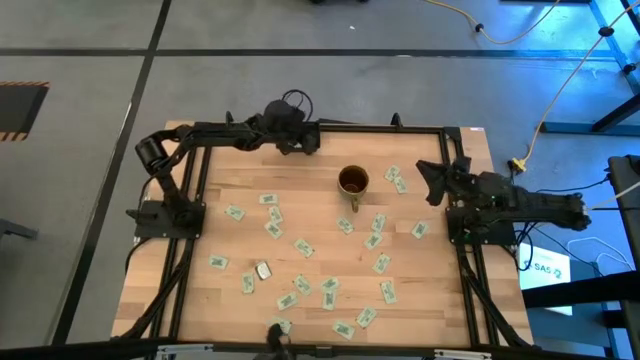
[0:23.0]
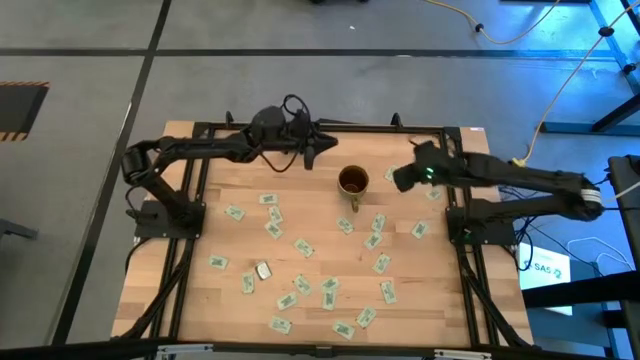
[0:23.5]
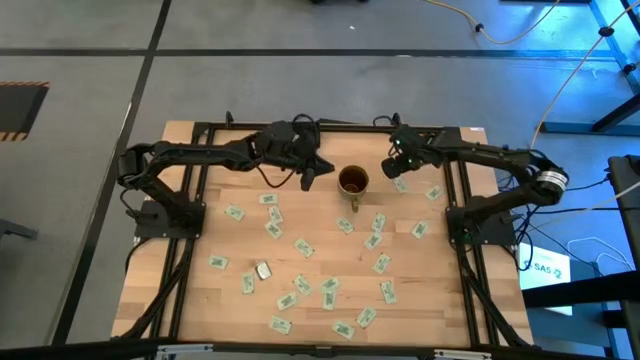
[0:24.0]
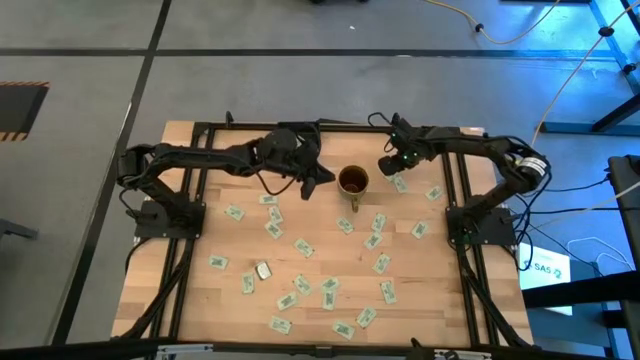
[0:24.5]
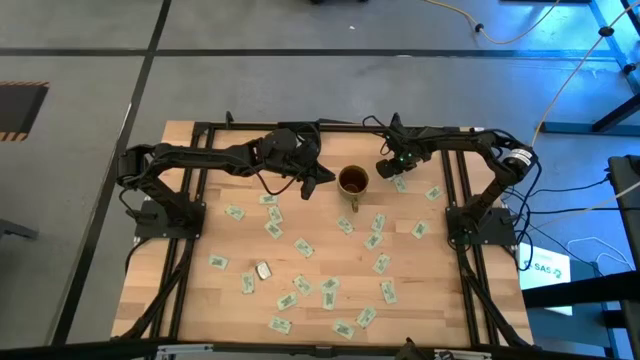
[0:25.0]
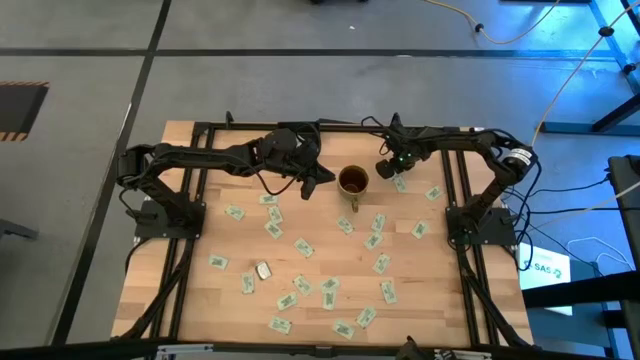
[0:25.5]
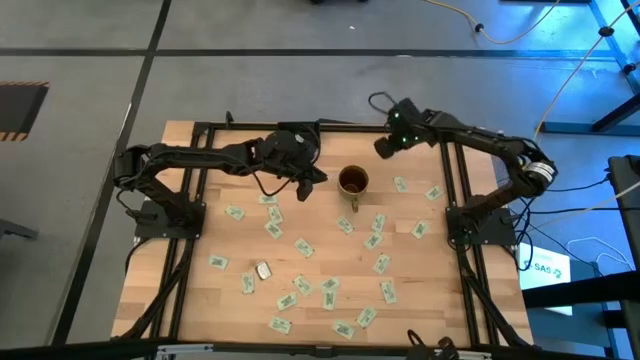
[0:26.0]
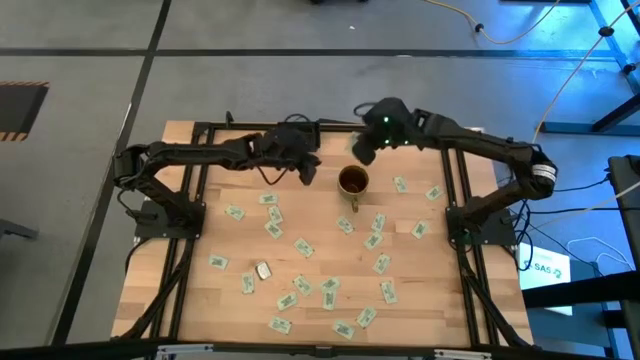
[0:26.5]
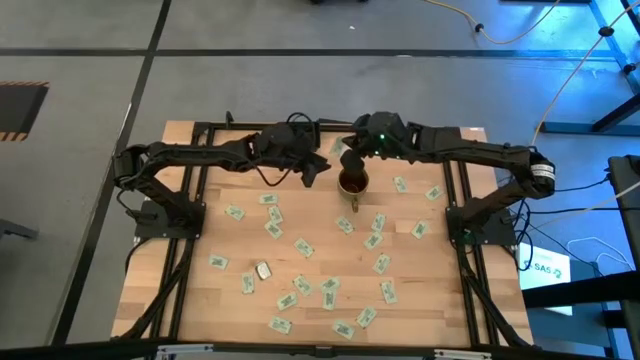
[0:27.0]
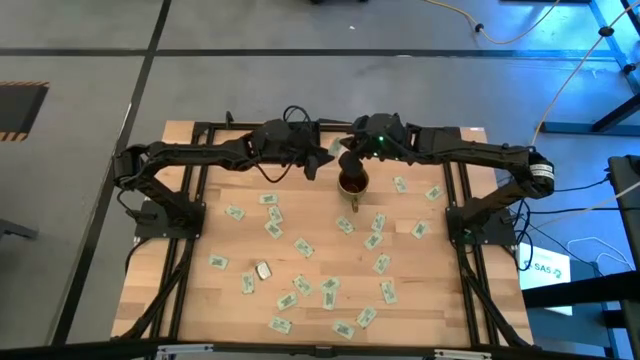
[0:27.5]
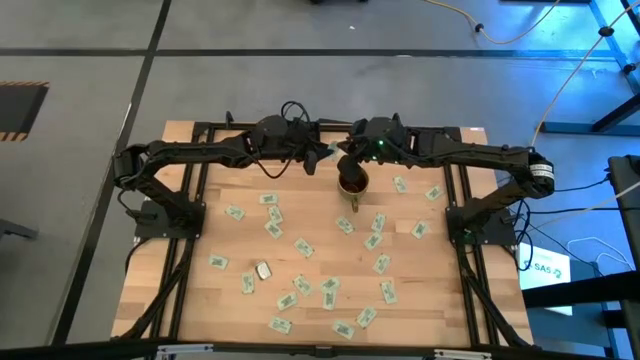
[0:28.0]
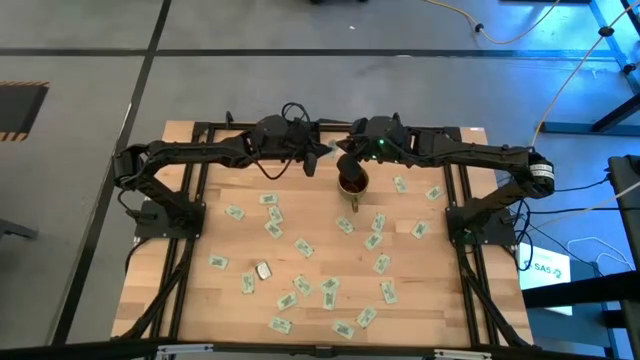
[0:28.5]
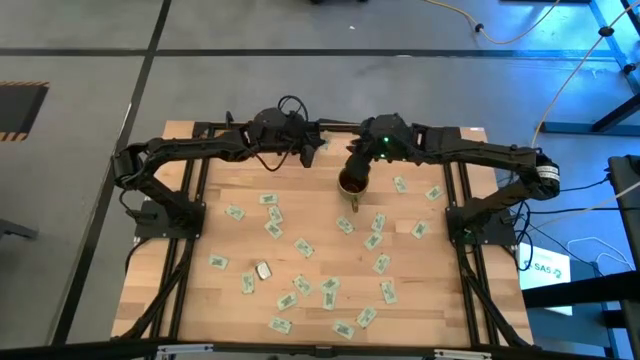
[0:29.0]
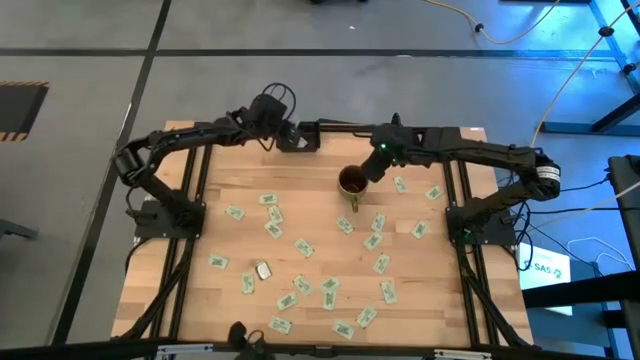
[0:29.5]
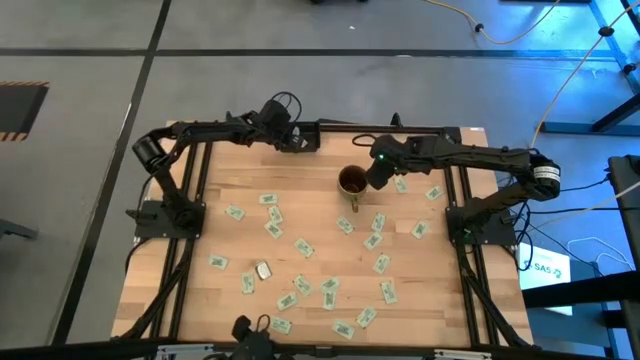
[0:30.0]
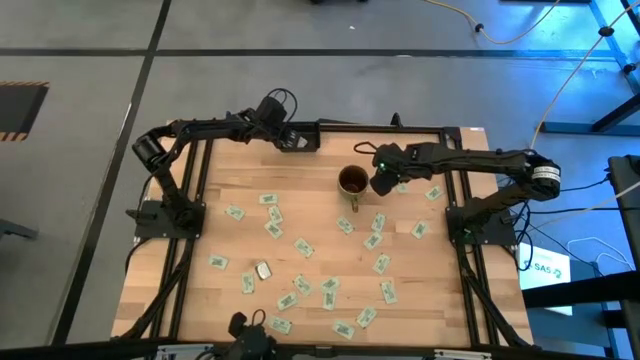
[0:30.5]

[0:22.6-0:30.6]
Task: Pick and place Stevia / Truvia into bins
Put the stevia packet into the black container

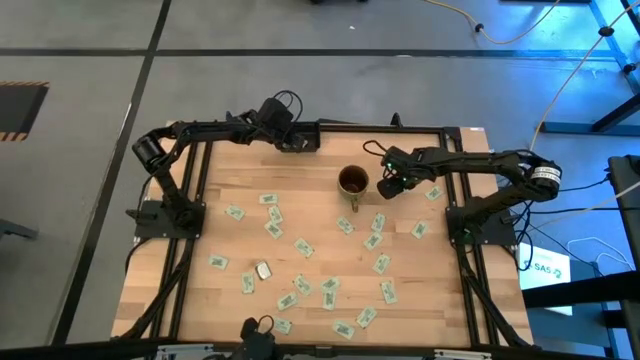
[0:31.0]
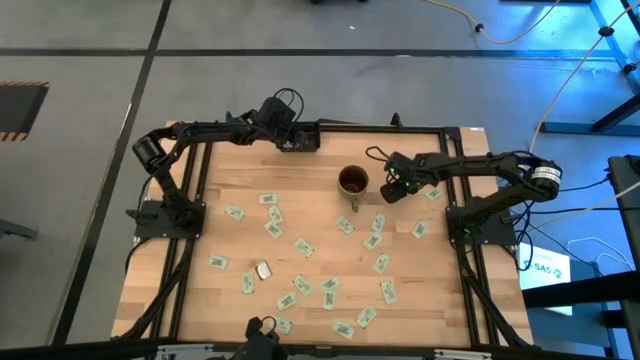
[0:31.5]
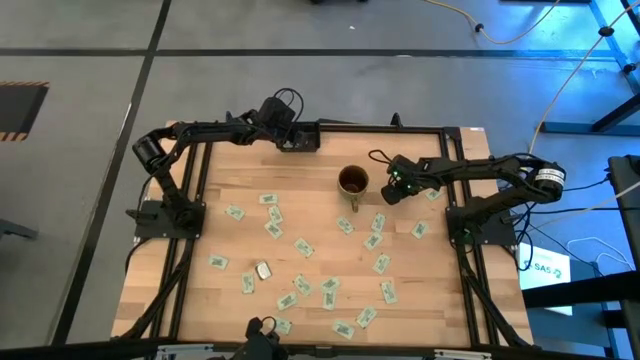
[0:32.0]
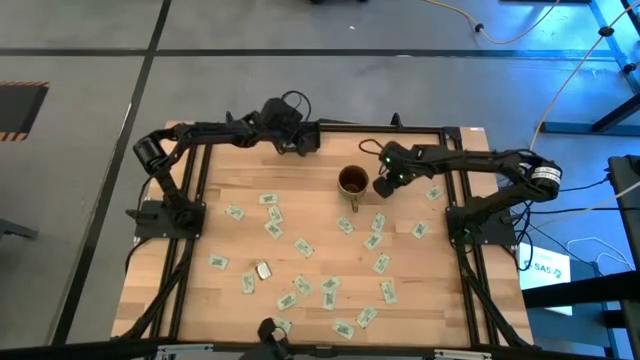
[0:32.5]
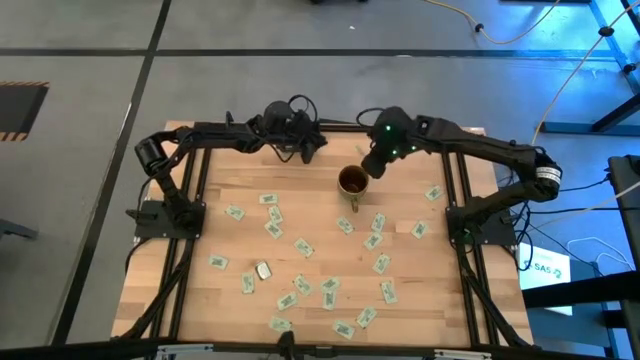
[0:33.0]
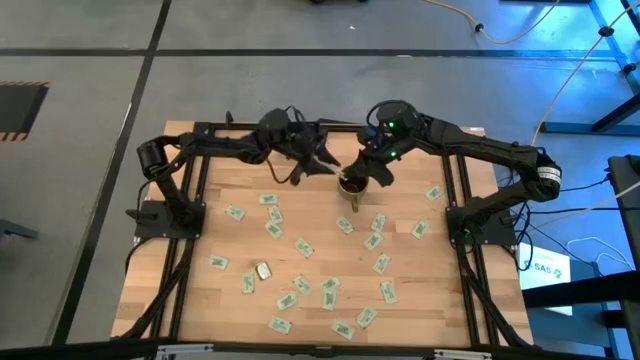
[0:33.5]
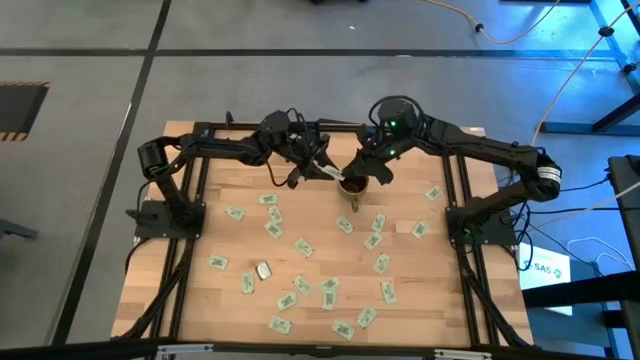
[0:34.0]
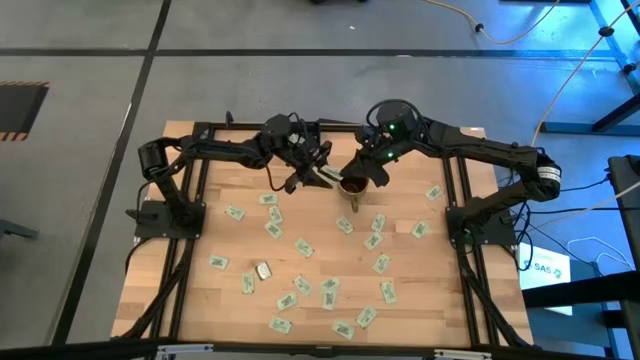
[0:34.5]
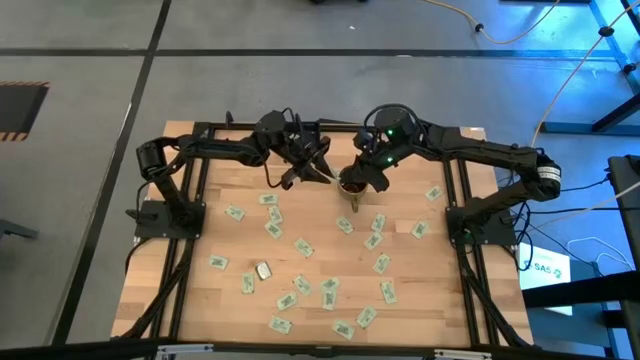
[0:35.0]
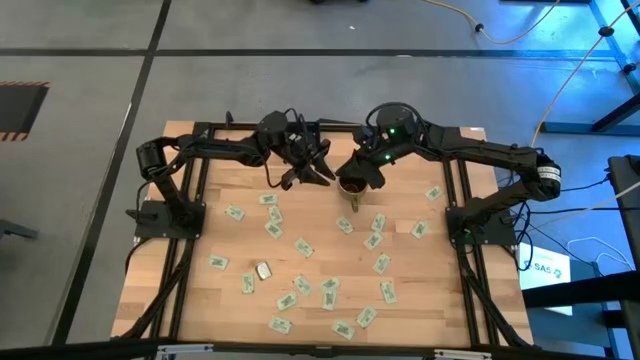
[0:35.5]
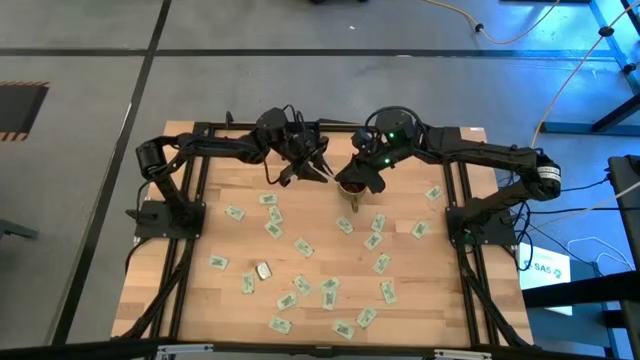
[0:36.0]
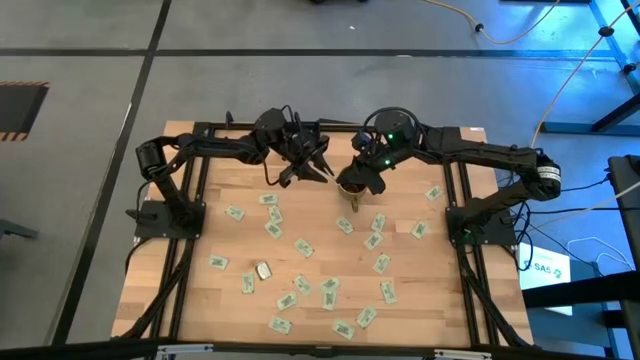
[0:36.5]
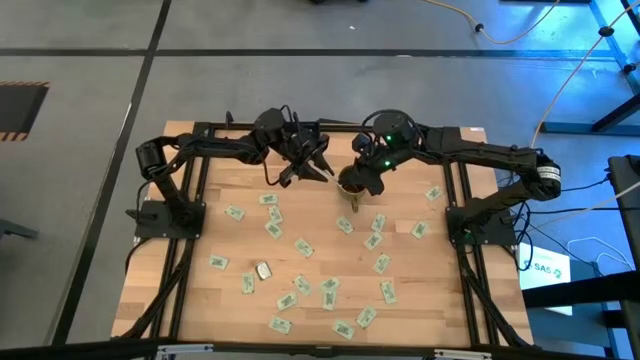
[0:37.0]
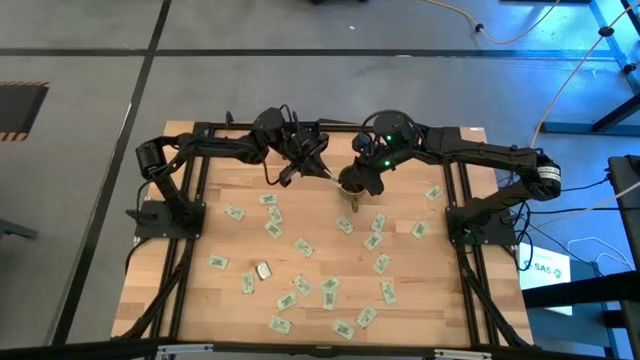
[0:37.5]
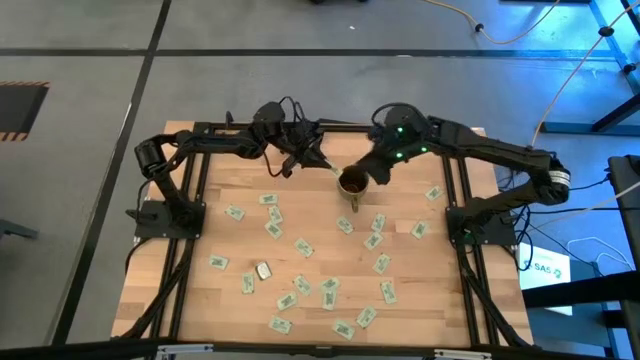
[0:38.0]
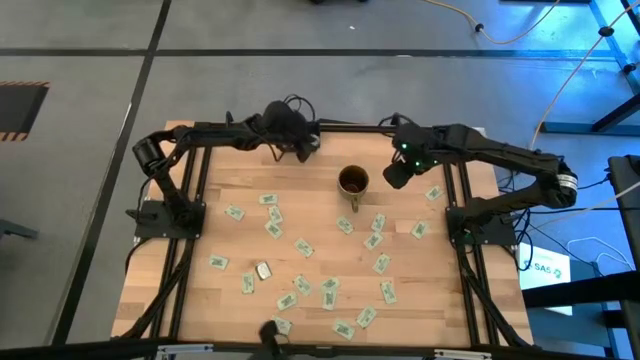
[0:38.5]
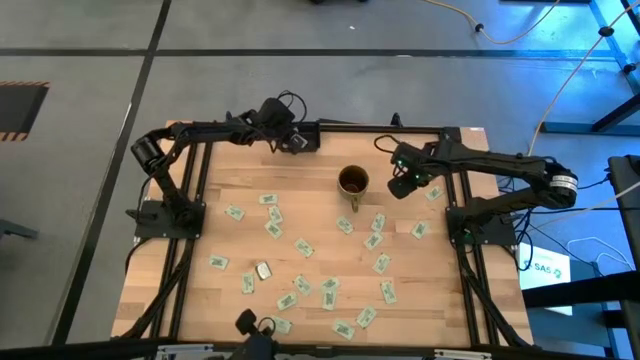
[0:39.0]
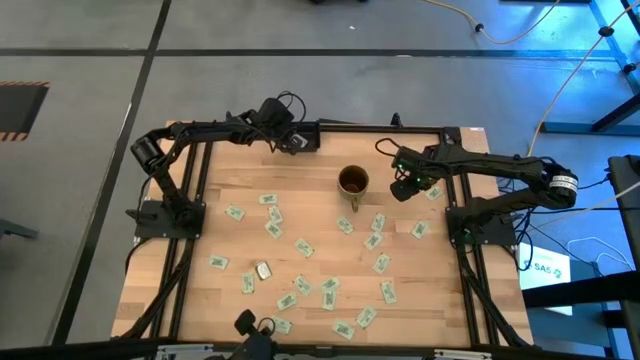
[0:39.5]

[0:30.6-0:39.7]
Put the stevia packet into the black container

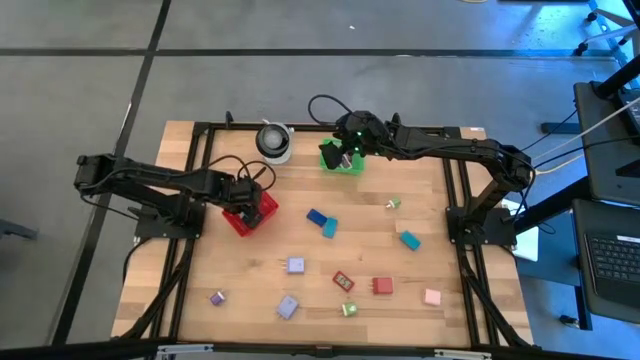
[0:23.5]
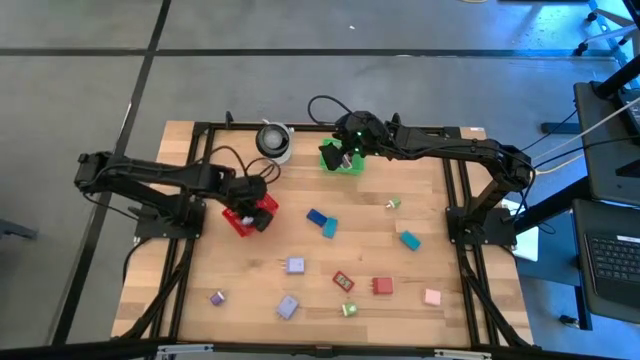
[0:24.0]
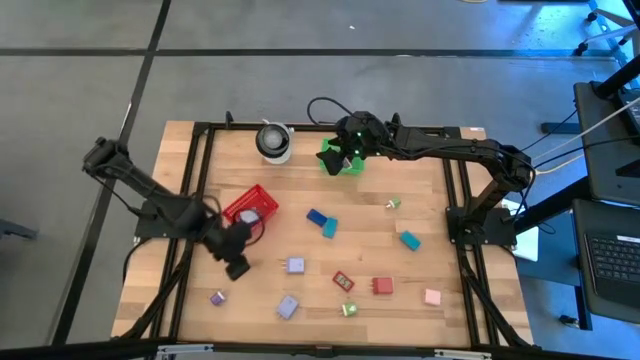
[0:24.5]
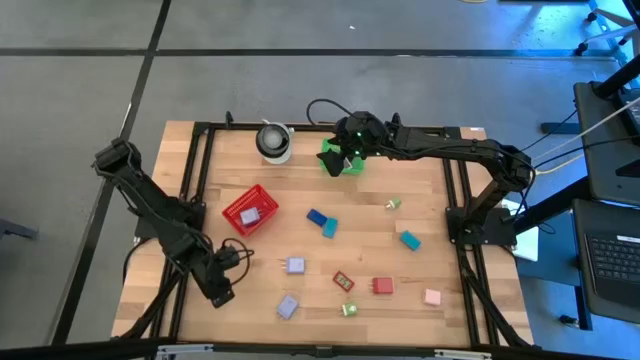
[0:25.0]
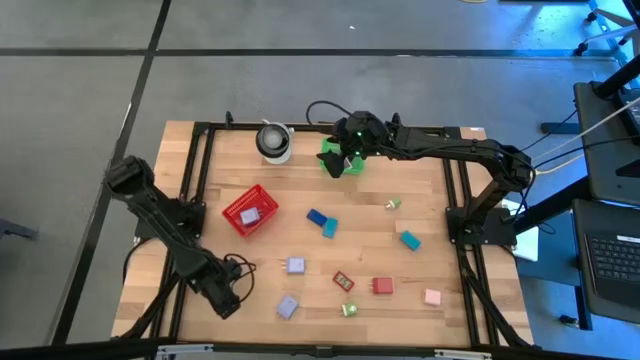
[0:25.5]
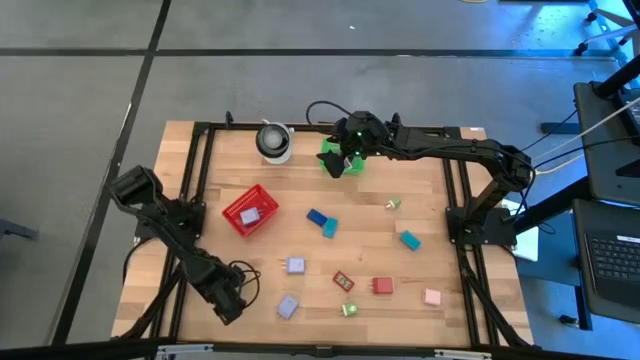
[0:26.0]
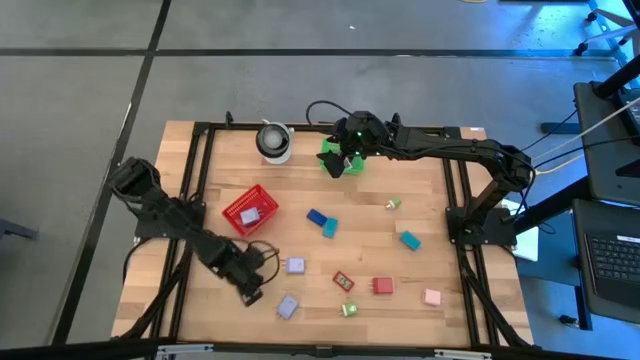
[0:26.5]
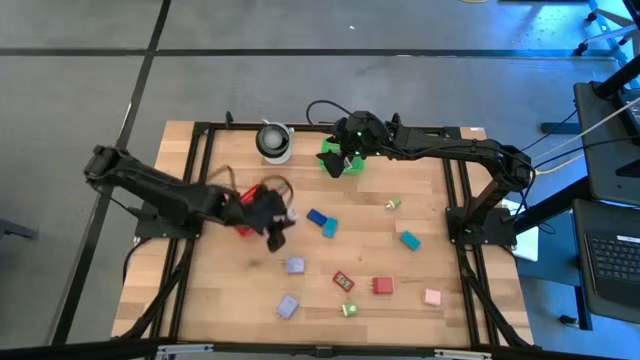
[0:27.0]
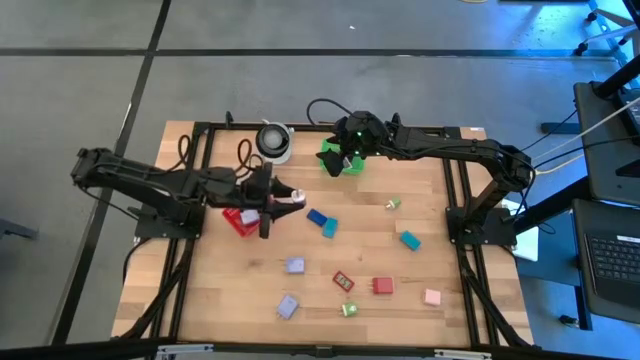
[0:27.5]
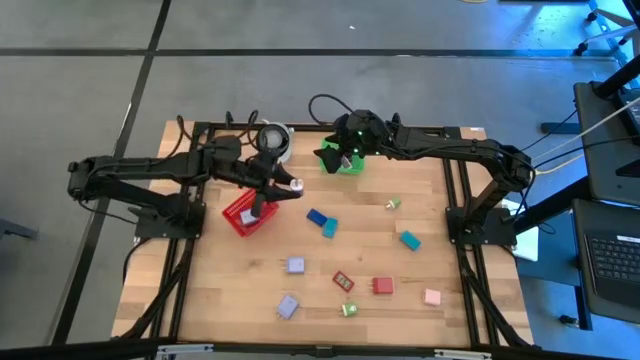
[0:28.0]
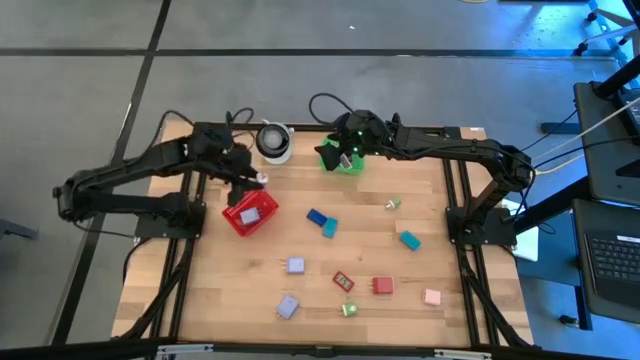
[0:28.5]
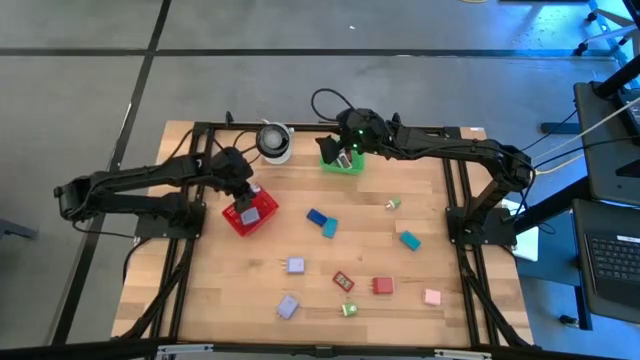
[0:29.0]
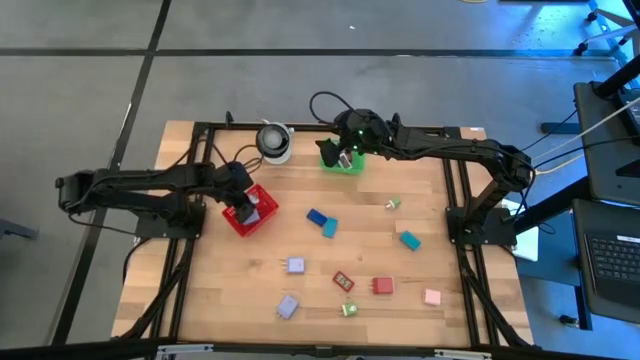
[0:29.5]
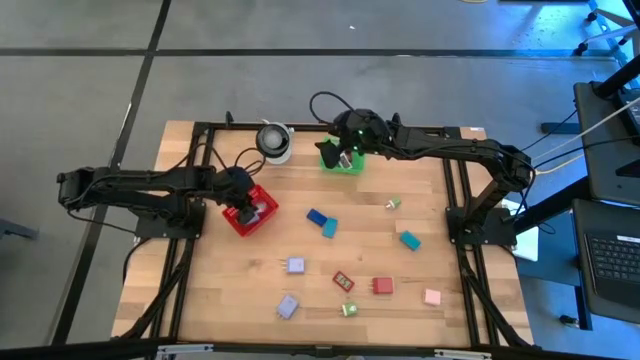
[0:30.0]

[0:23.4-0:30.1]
Task: Pick & Place Office items
Put the purple charger adapter into the red bin
